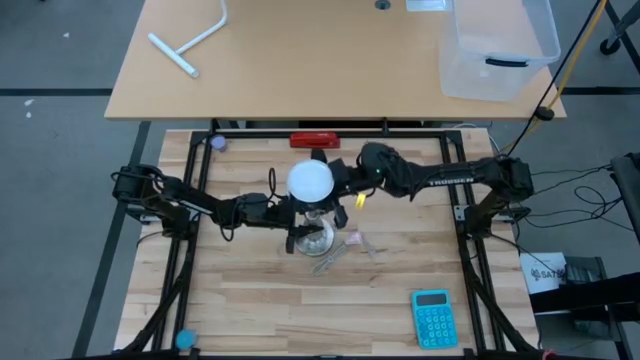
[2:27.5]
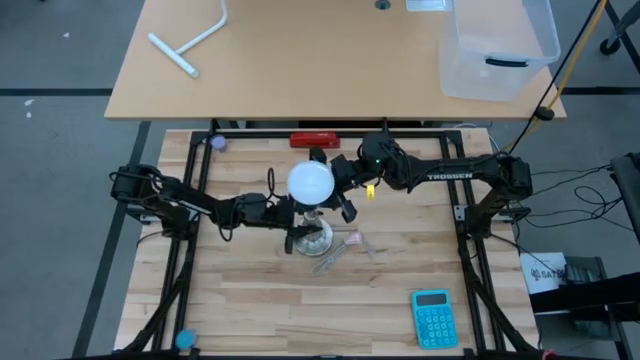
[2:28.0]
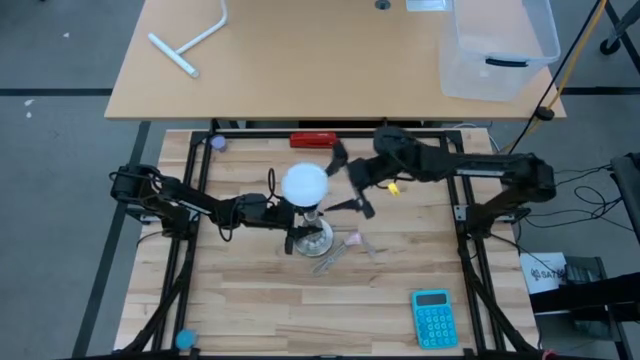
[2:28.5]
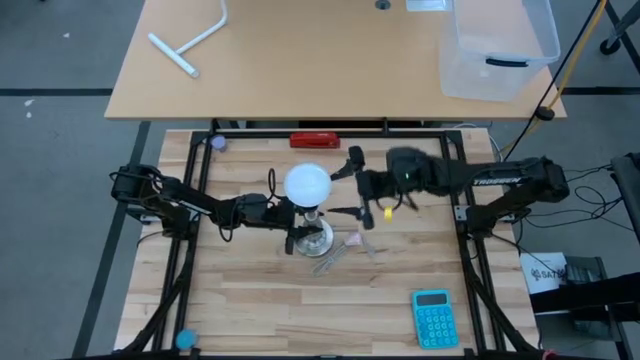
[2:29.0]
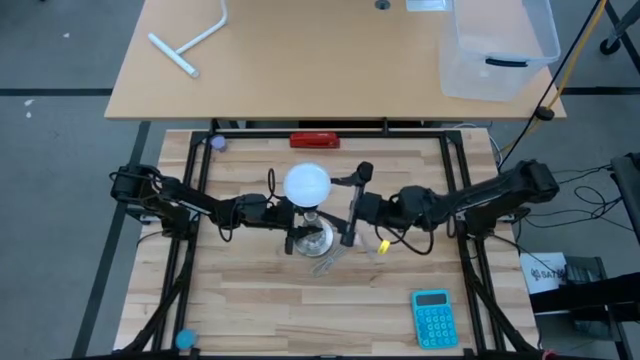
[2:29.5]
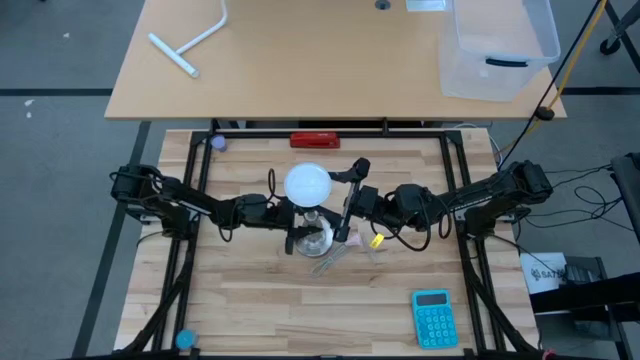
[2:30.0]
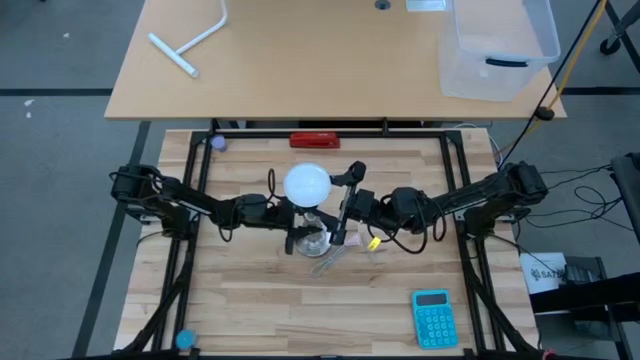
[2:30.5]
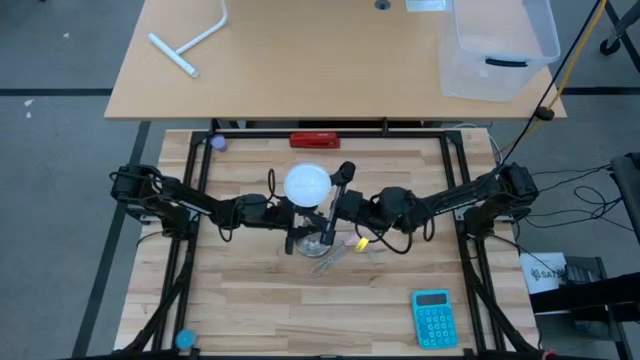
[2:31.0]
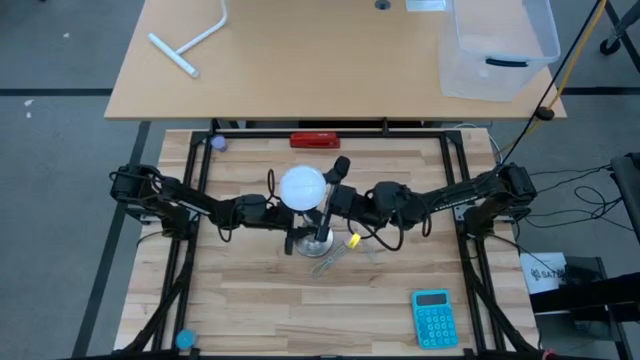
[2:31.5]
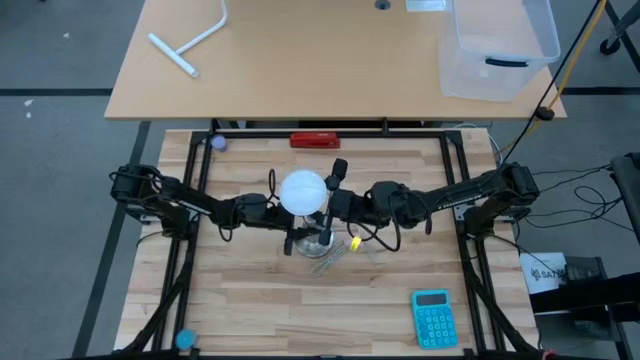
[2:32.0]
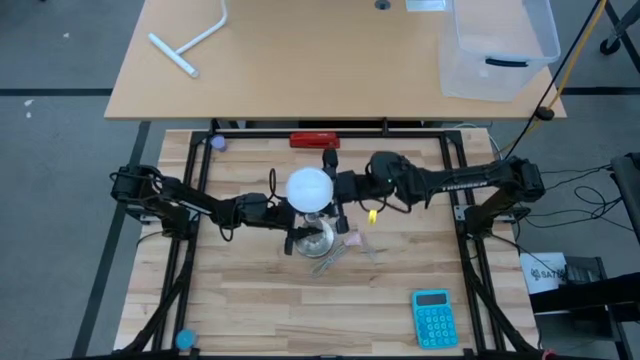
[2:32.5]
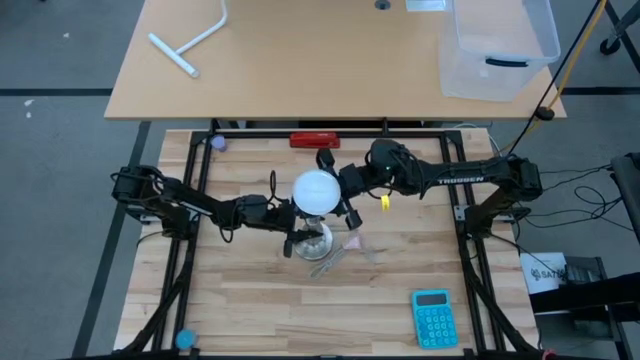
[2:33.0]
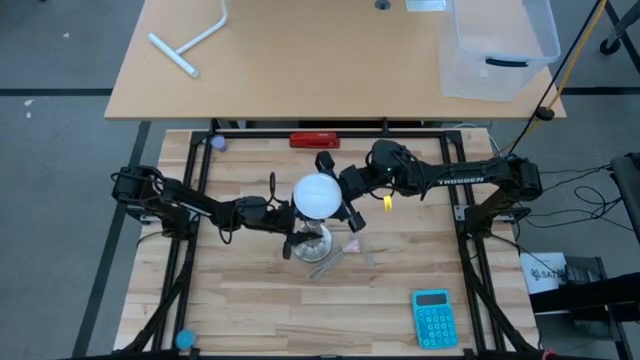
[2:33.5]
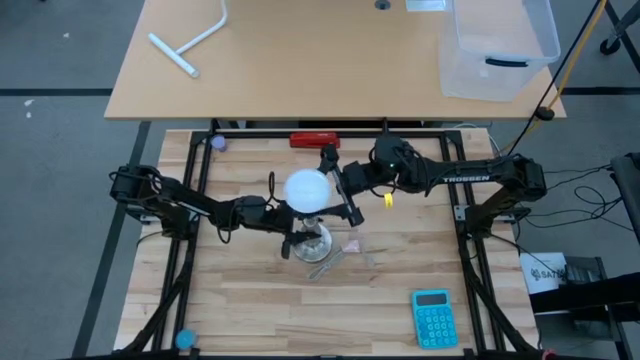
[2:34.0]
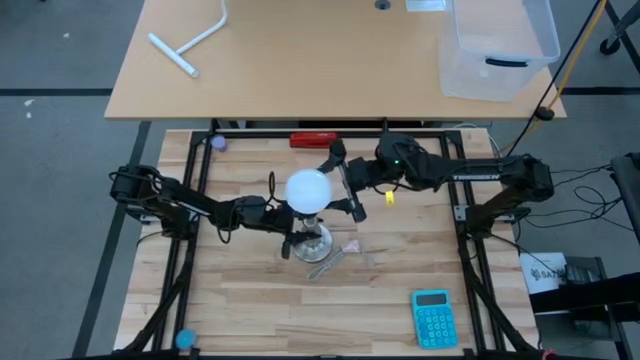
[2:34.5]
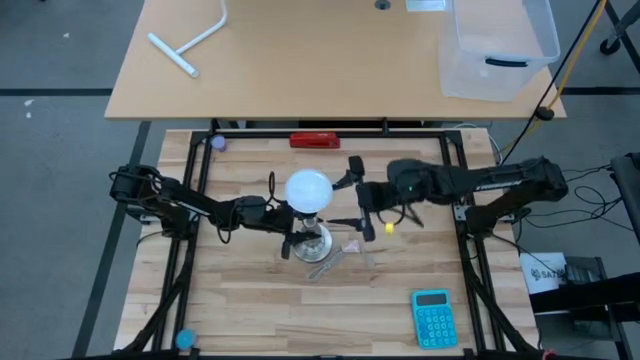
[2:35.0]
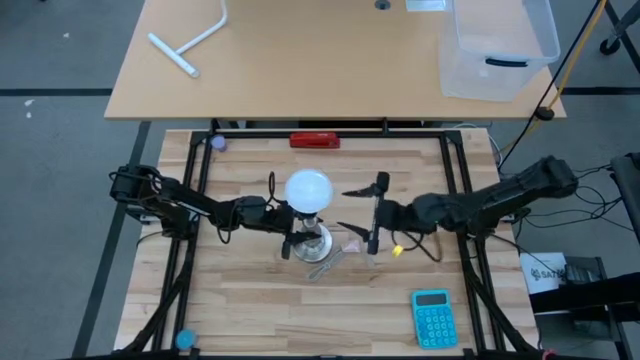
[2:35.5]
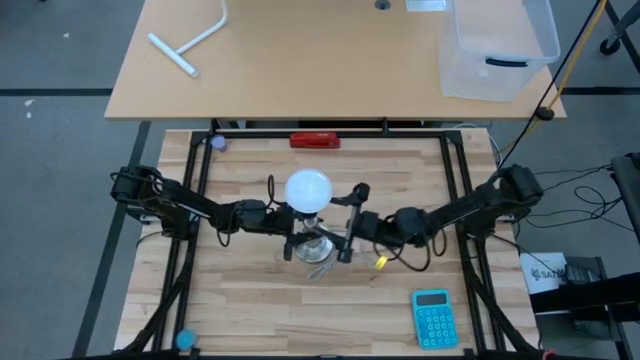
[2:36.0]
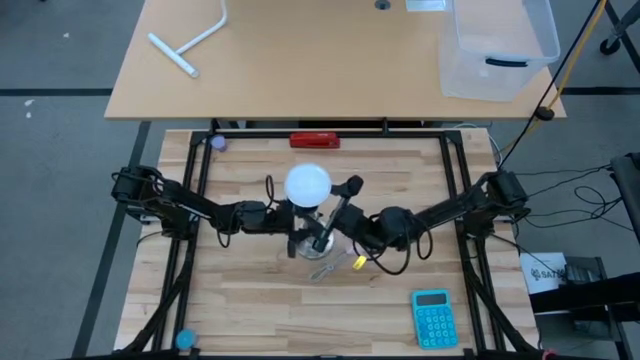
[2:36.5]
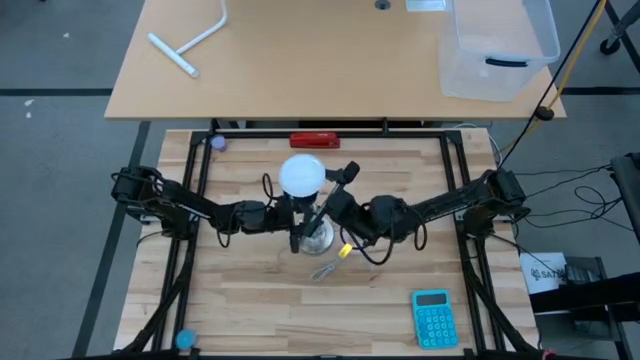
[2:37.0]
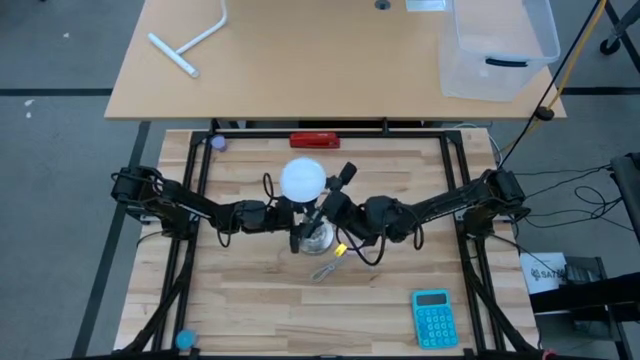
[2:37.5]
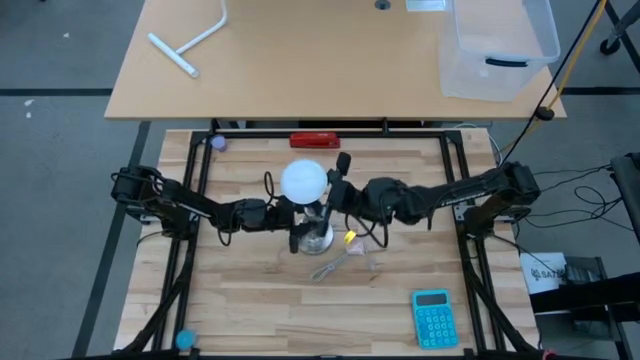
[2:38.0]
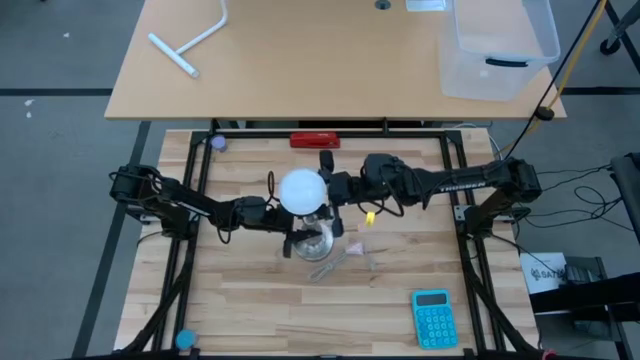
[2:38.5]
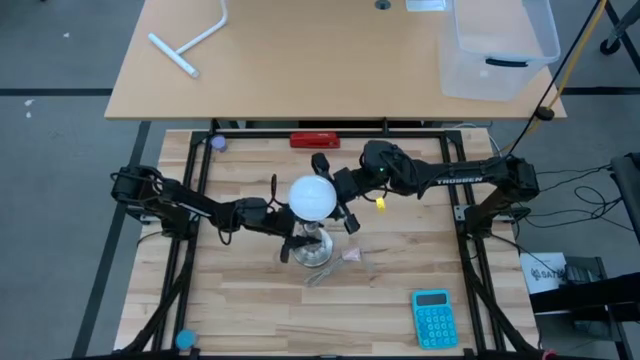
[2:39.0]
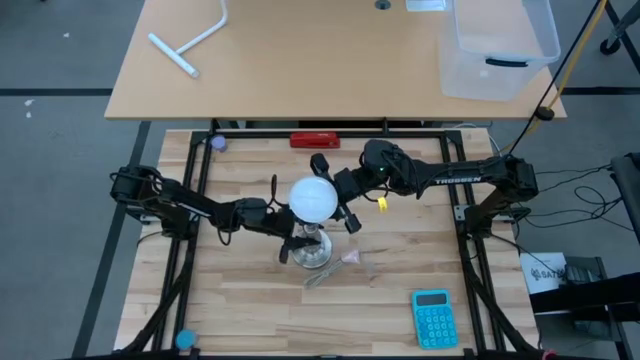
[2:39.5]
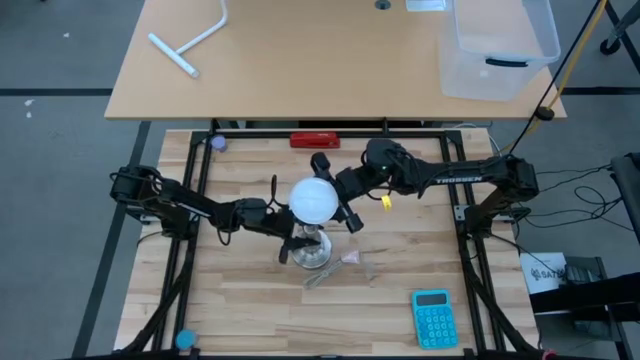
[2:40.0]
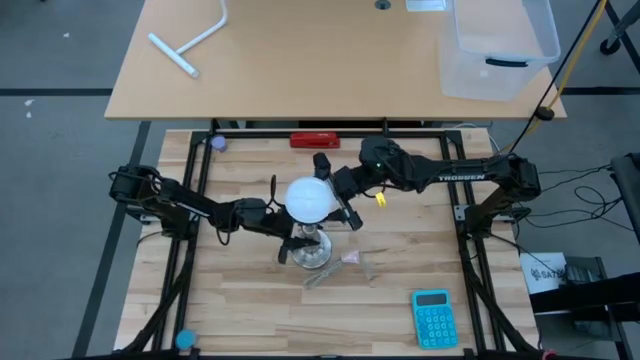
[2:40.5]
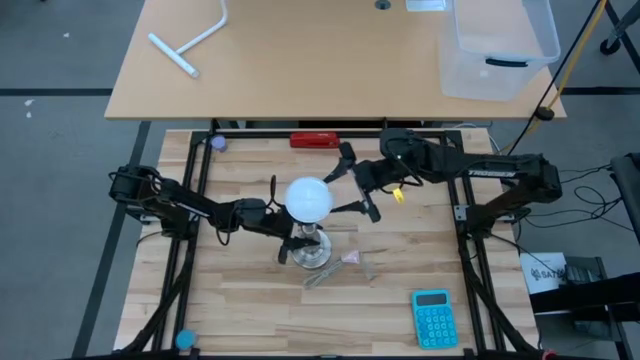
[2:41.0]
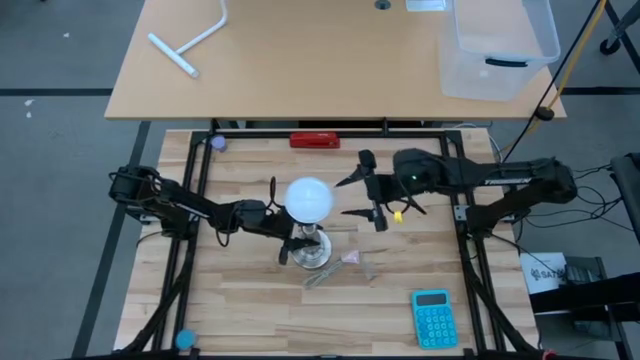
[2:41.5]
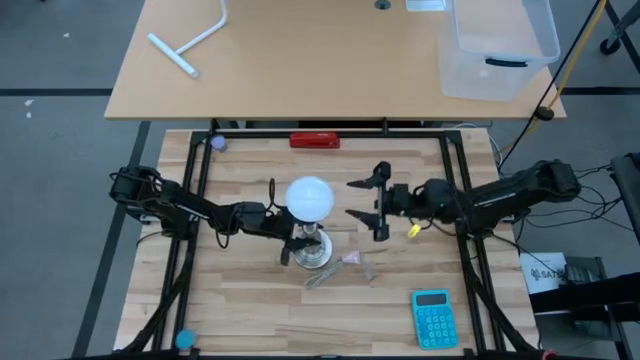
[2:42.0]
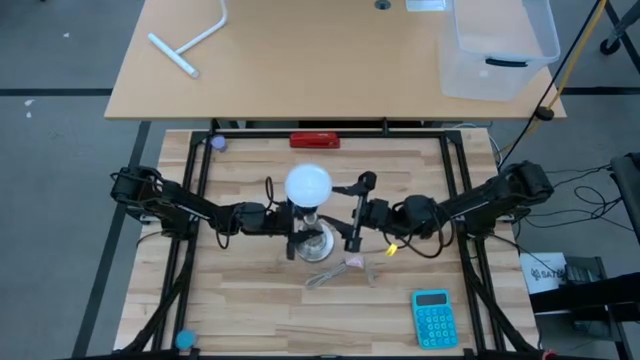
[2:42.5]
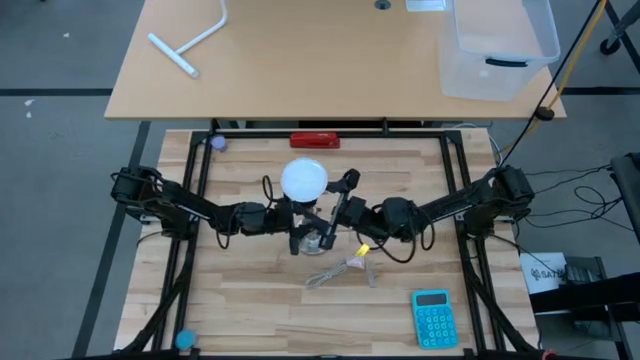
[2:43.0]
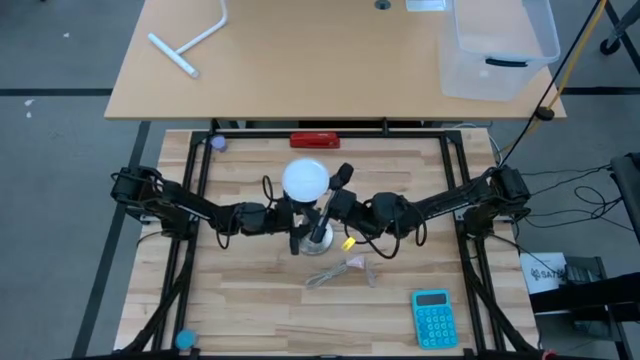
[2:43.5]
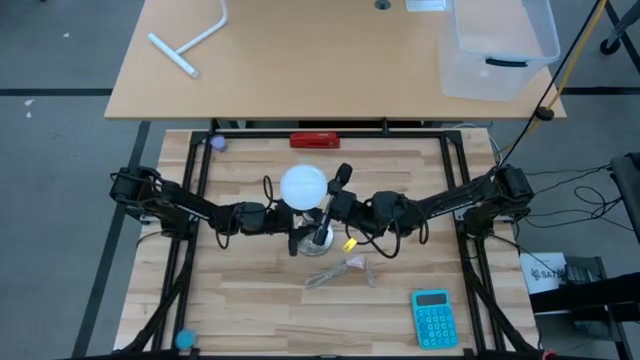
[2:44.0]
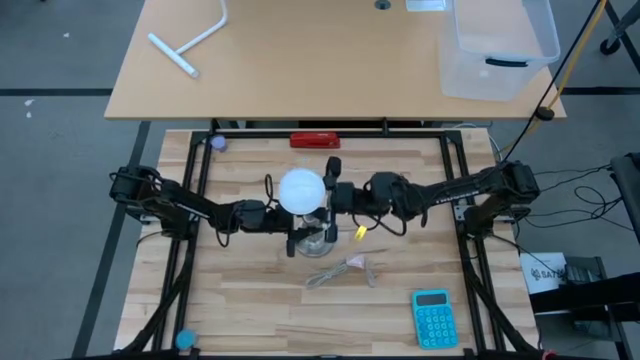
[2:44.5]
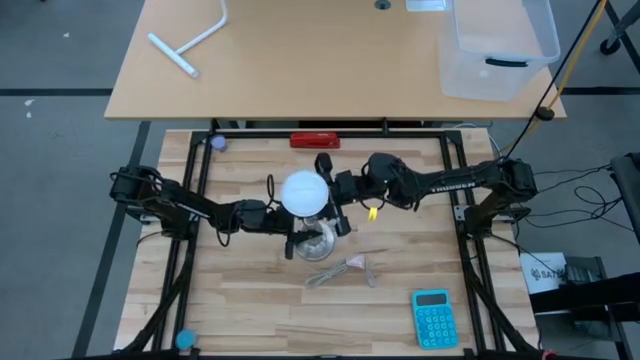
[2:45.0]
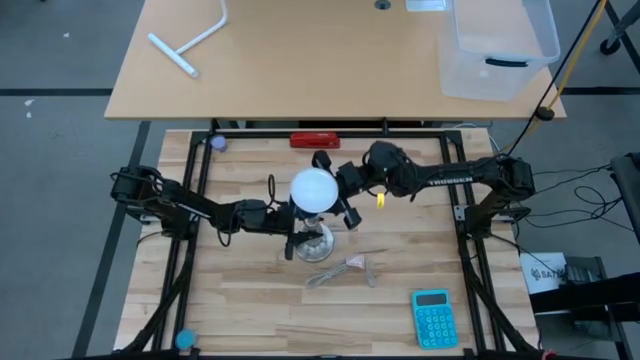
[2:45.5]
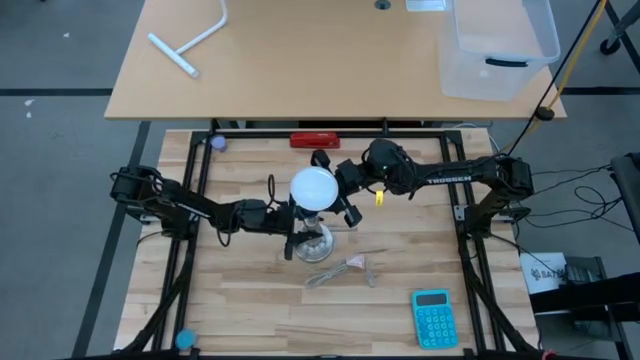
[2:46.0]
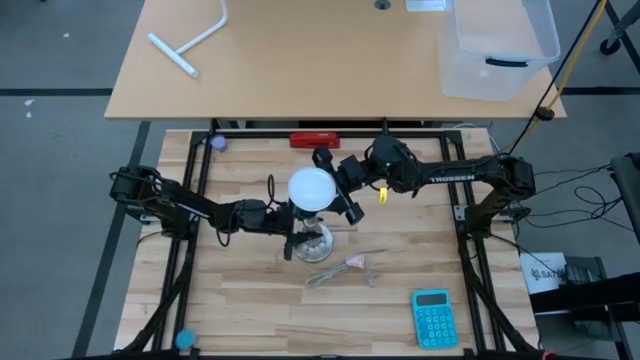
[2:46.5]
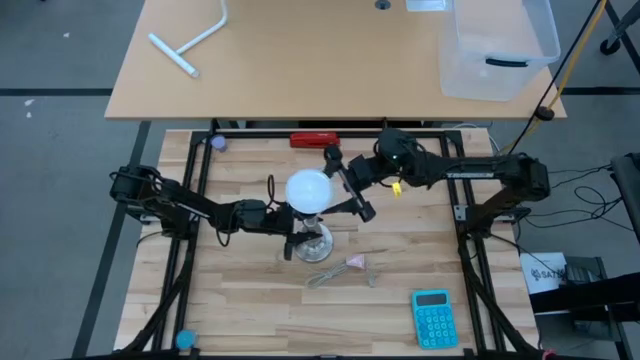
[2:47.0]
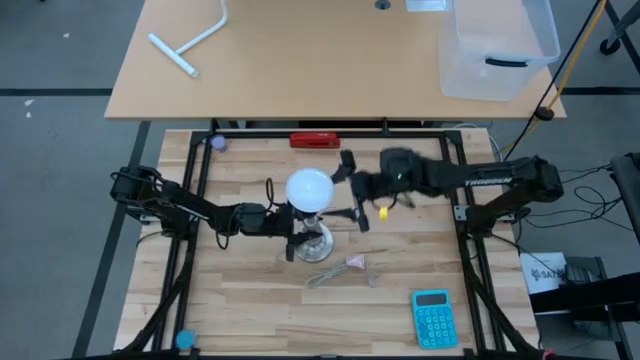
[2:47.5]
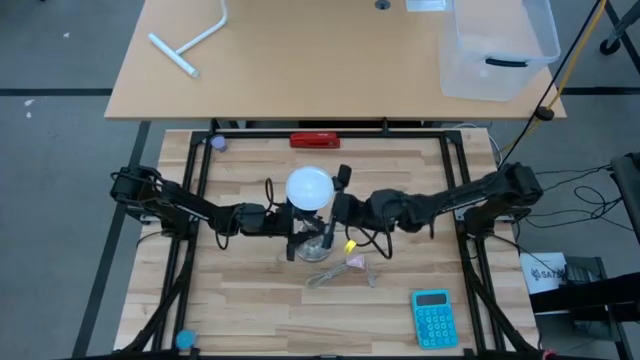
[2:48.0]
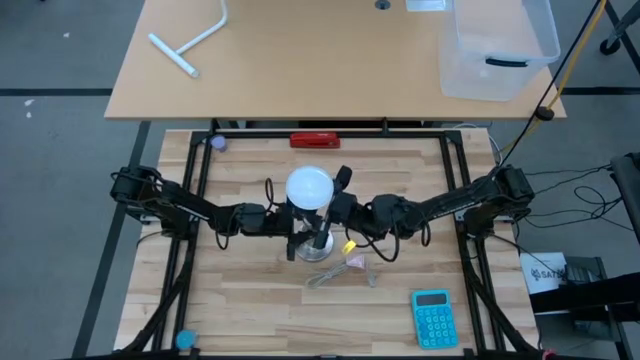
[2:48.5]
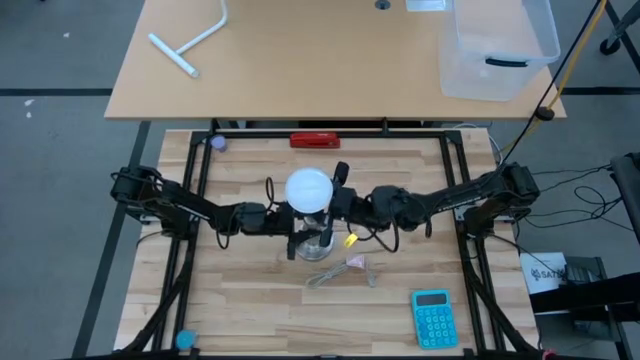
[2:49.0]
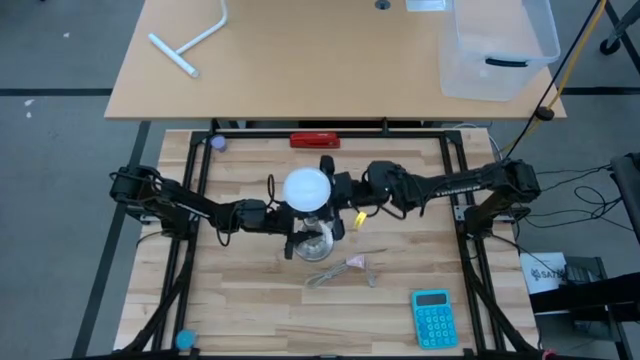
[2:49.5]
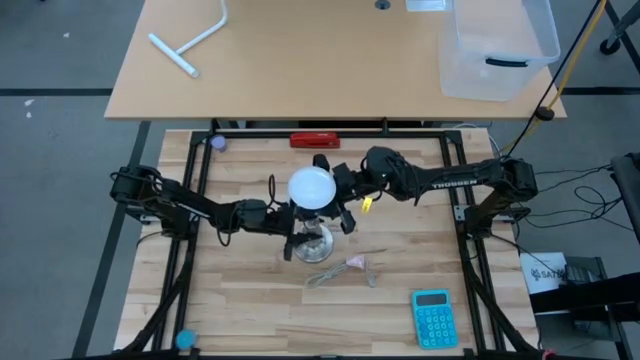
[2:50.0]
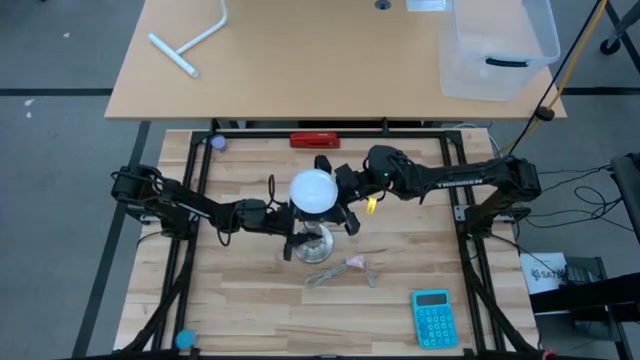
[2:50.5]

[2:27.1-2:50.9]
Task: Screw lightbulb
Remove the white lightbulb from the silver lamp
